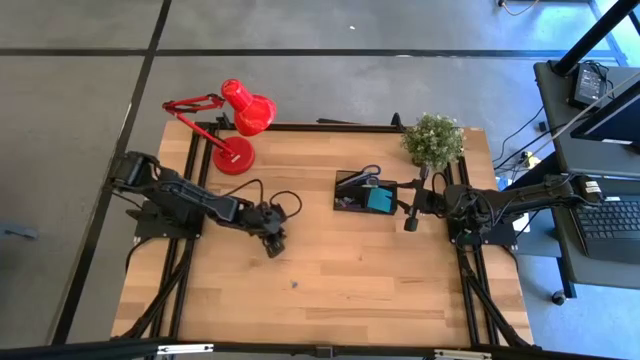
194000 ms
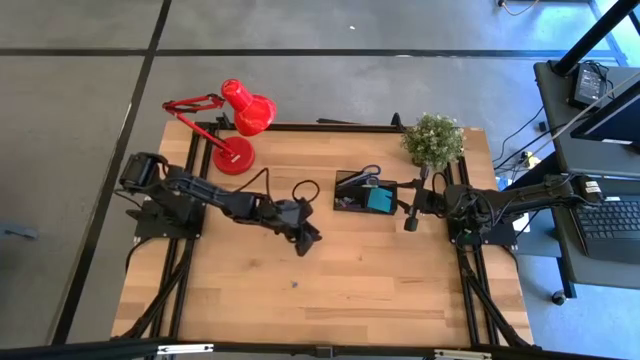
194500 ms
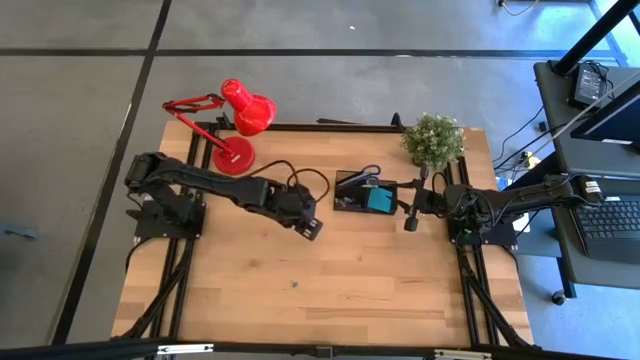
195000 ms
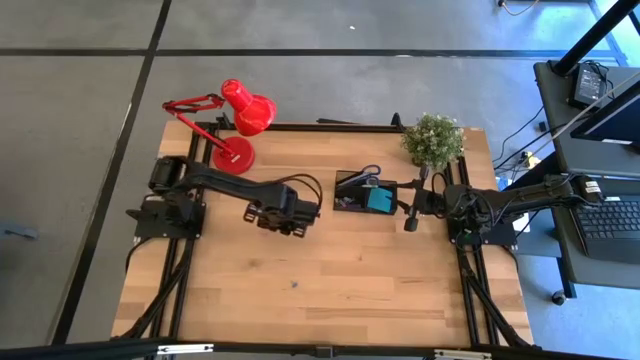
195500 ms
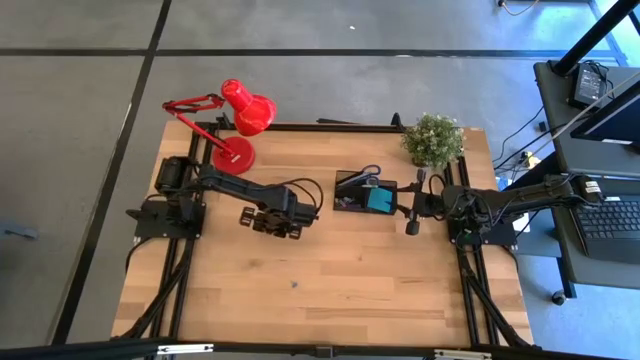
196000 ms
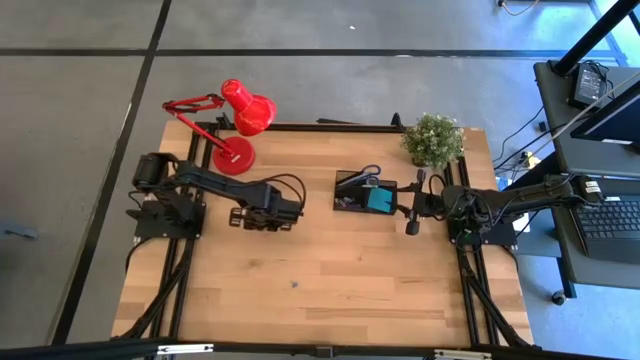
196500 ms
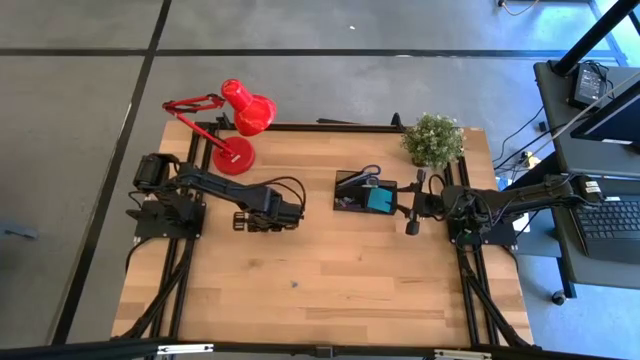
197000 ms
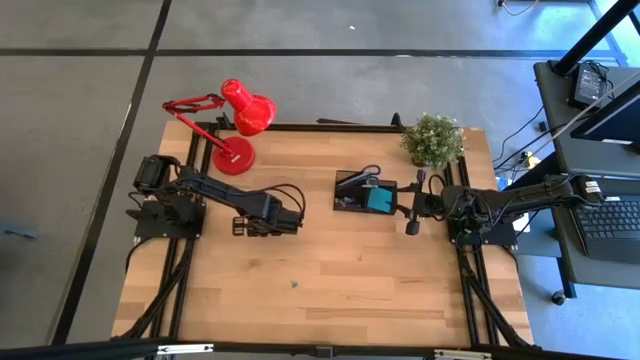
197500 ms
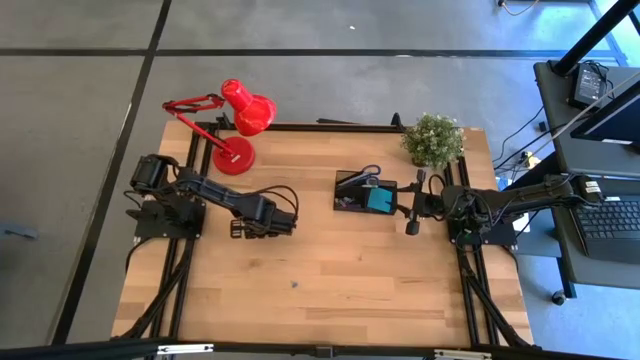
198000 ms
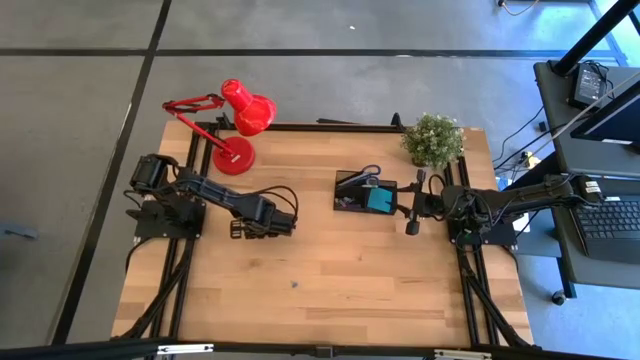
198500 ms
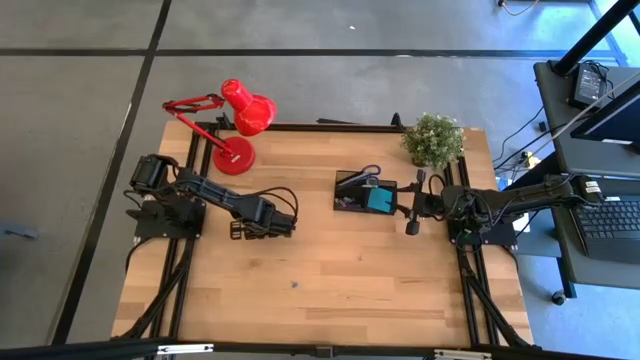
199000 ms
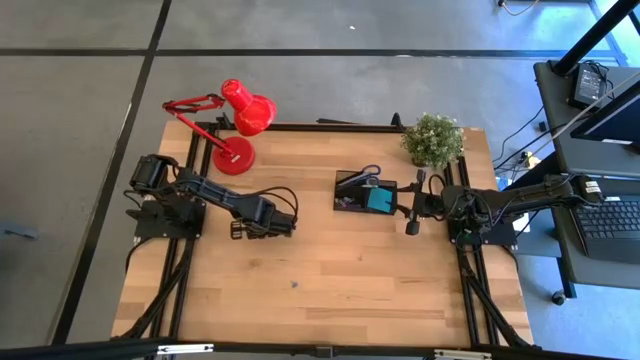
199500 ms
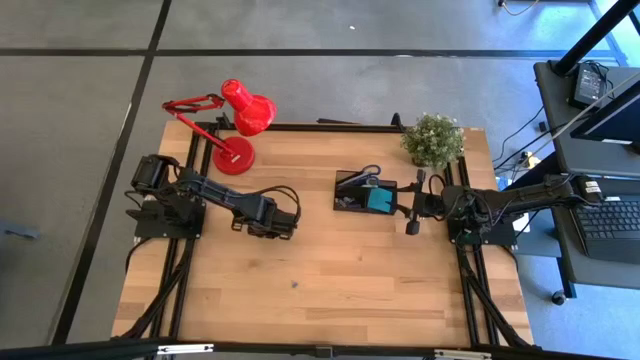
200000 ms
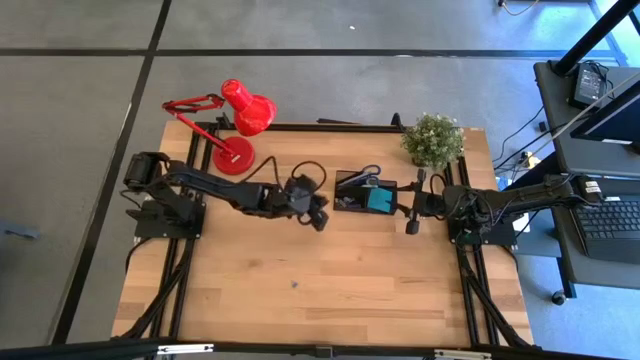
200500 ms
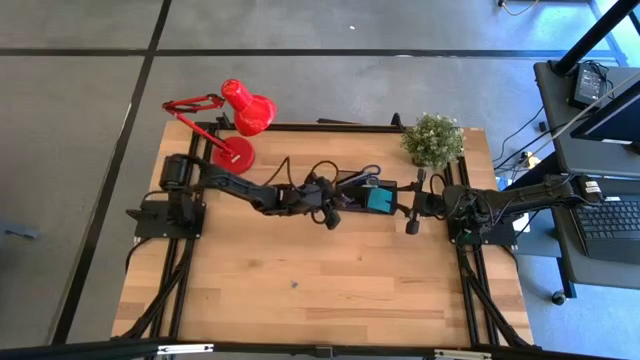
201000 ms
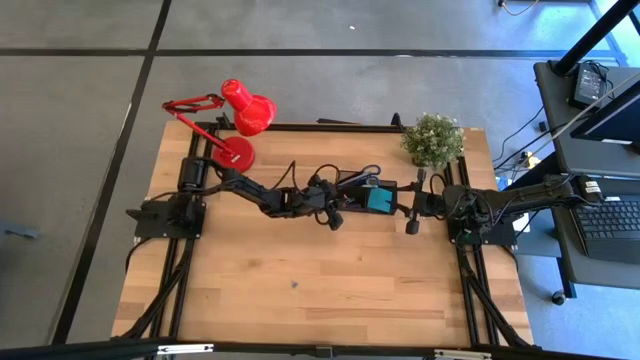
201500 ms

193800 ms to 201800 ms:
Task: Pick and place office supplies into organizer
Put the pink binder clip into the black desk organizer

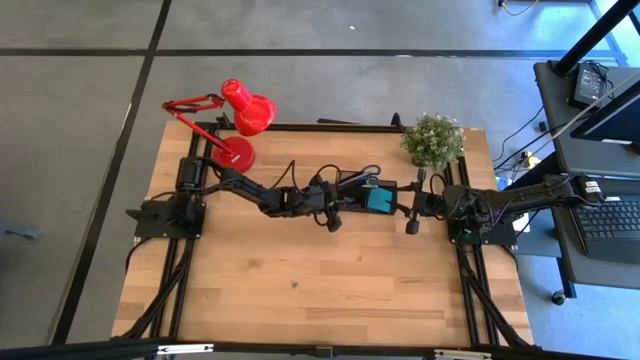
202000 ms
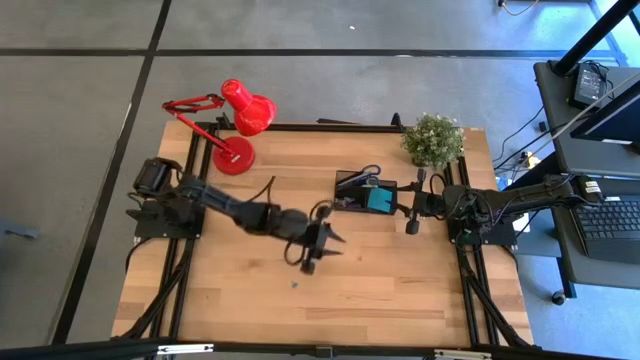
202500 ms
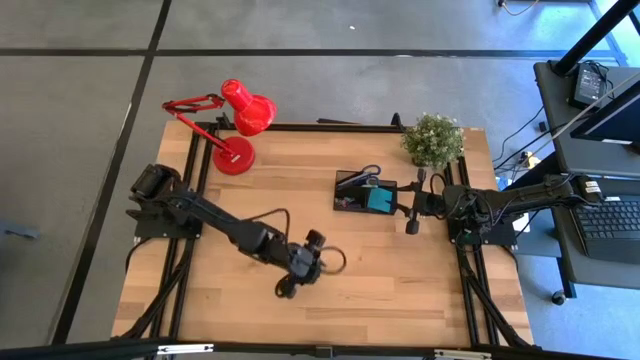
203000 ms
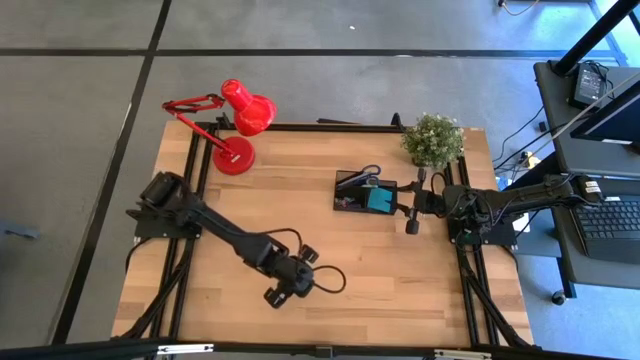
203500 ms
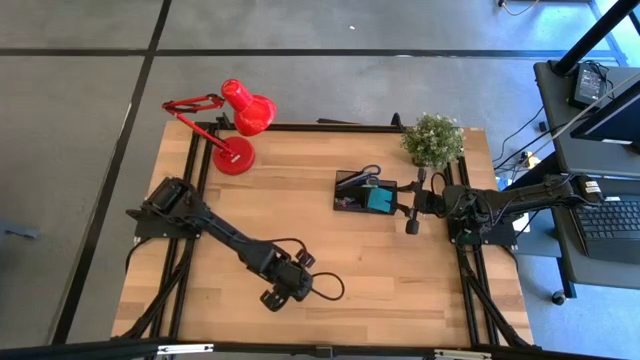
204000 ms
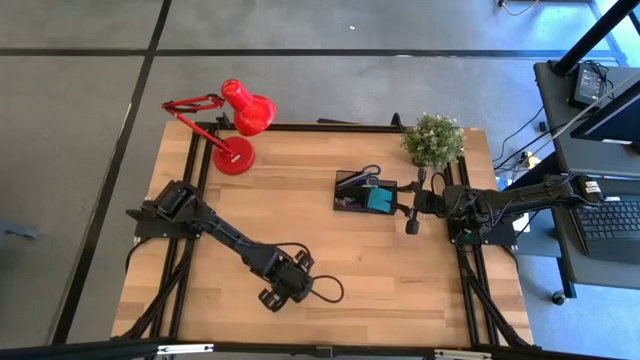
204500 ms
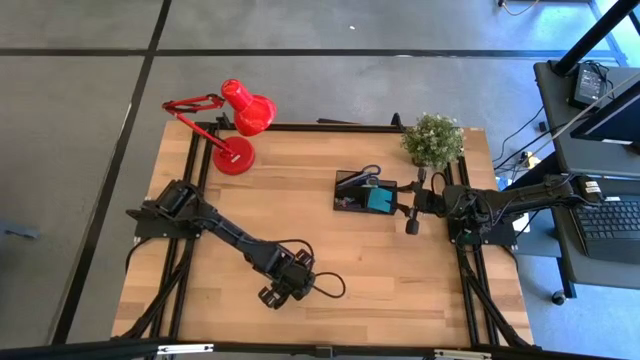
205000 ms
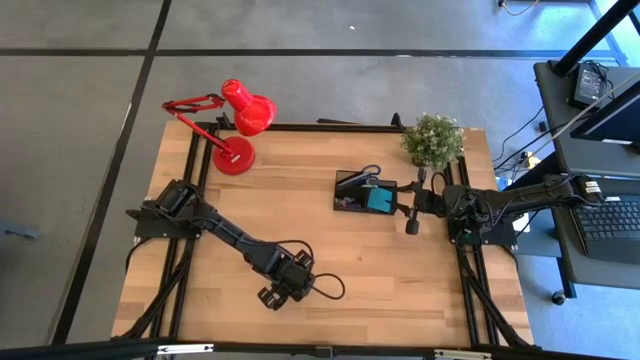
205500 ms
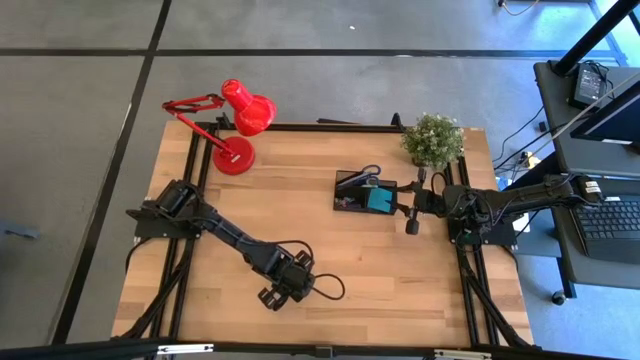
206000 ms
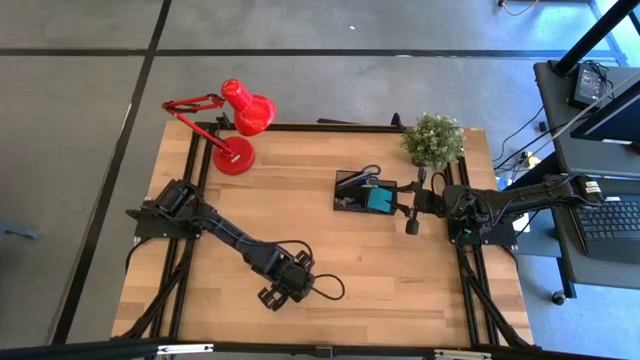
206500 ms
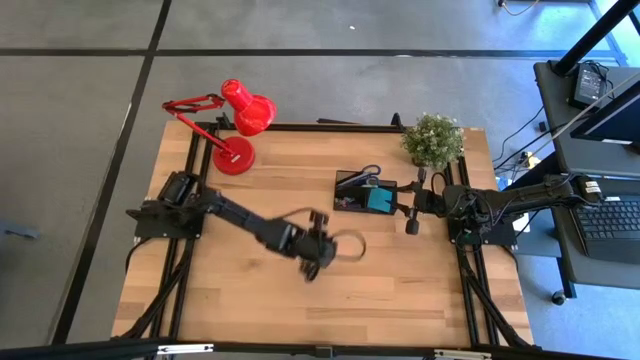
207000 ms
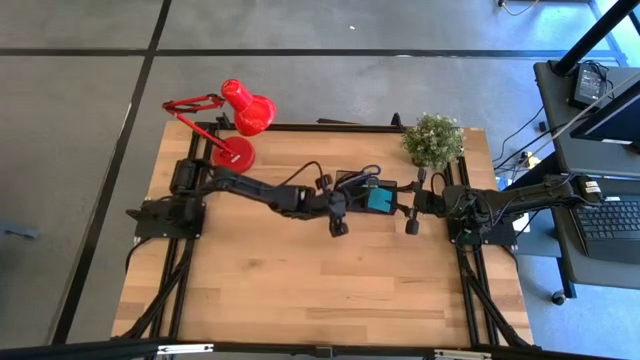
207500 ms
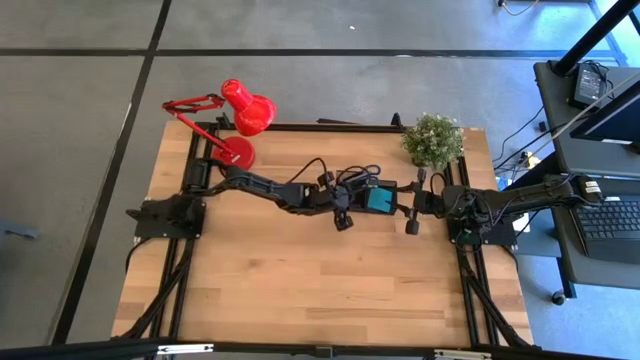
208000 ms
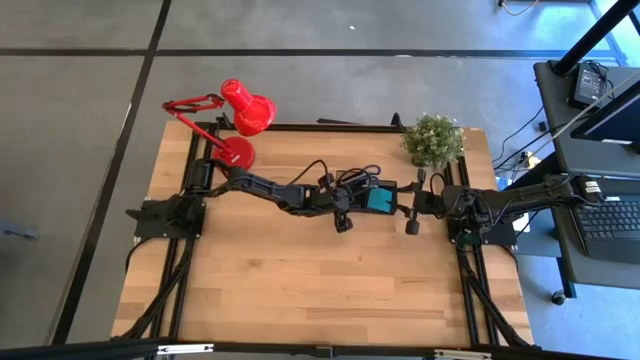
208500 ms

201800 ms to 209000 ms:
Put the blue binder clip into the black desk organizer

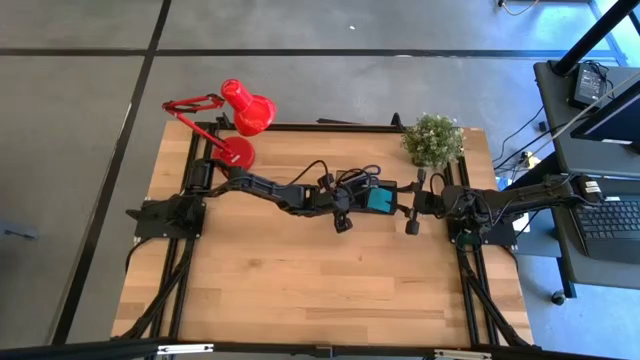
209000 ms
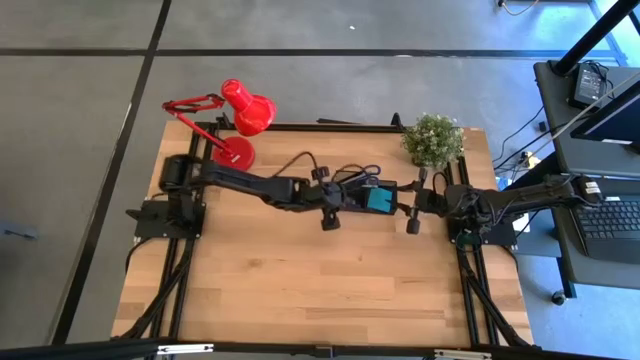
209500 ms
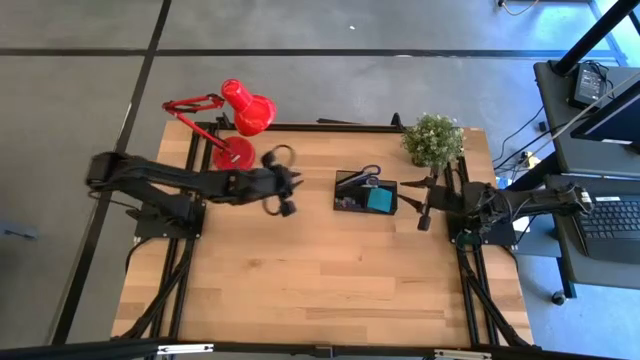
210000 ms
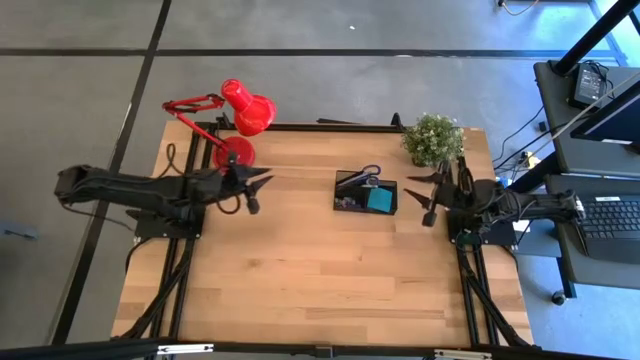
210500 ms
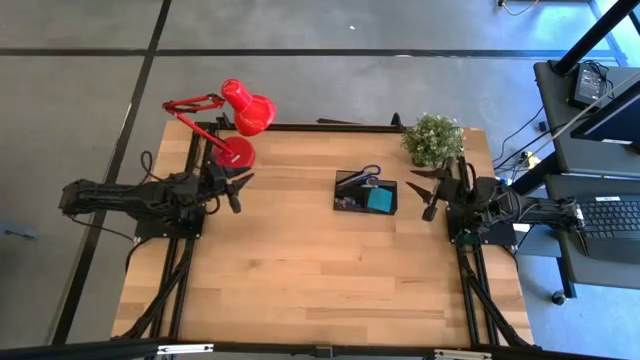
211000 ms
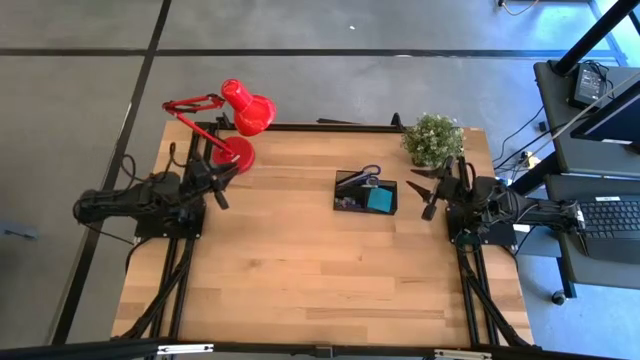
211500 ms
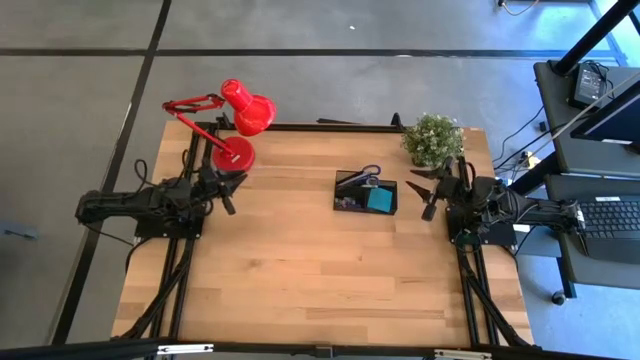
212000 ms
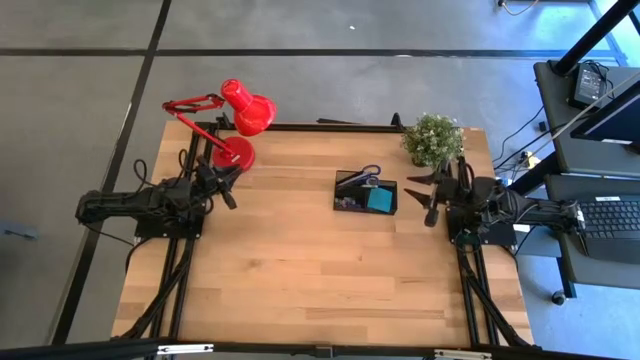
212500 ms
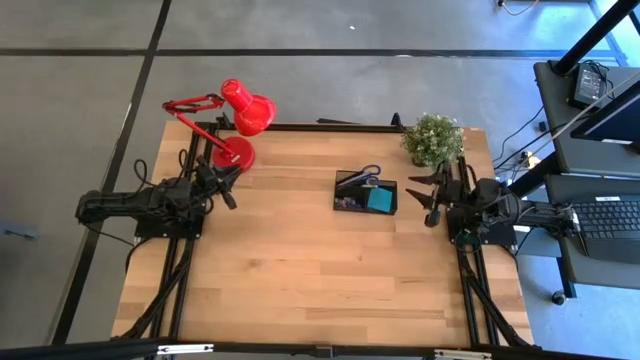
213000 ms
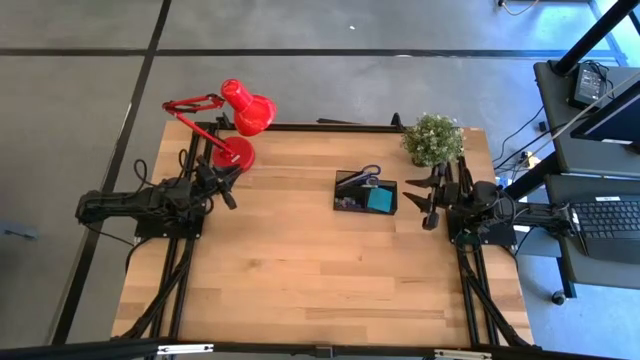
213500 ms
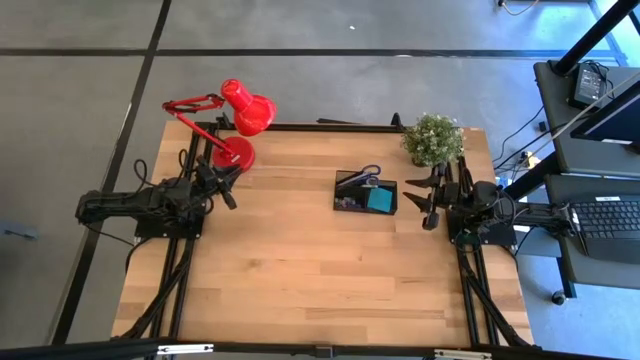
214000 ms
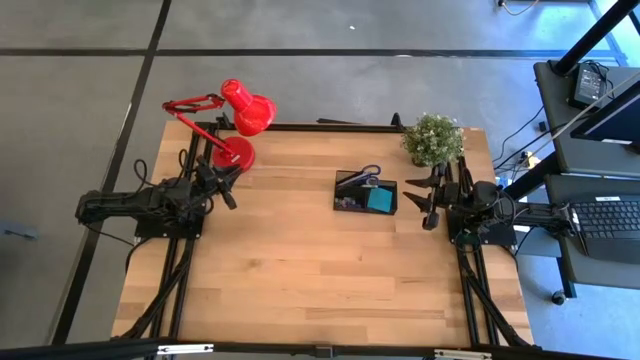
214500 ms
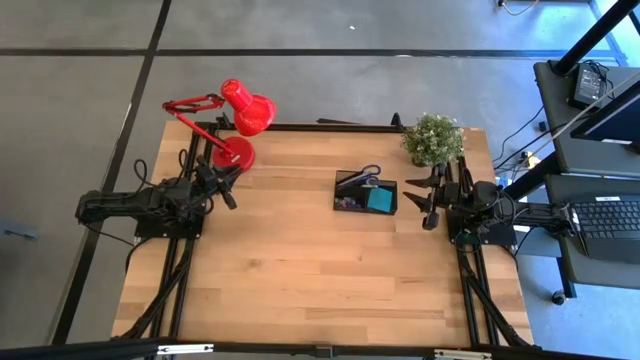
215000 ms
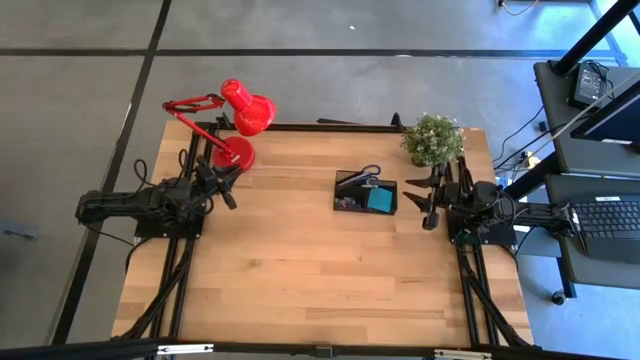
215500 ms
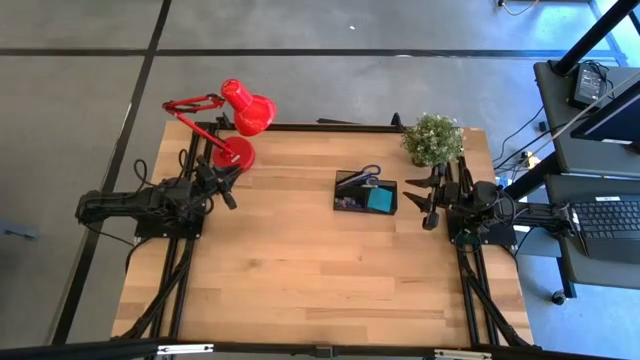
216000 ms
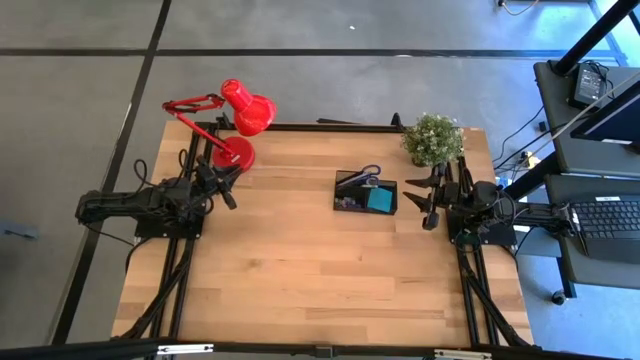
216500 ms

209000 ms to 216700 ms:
Return to Home Position

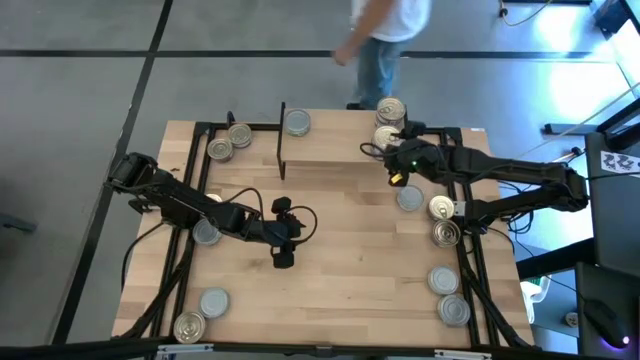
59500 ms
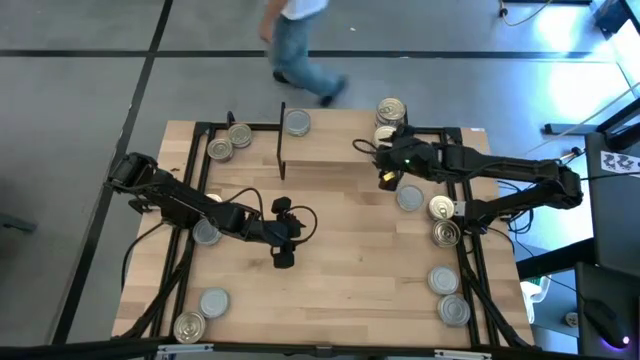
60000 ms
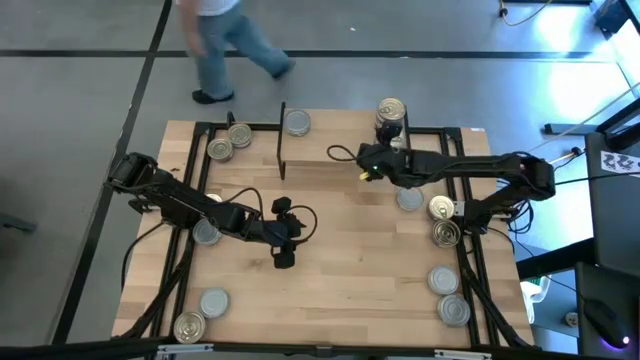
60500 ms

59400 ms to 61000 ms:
Task: Stack canned seafood by type on shelf
Adjust the blue pink tuna cans on the shelf
